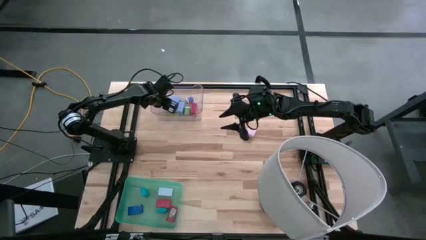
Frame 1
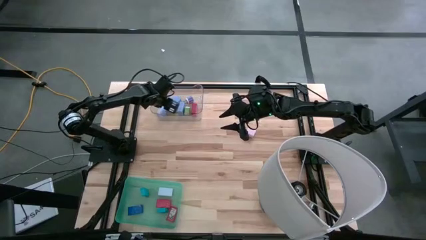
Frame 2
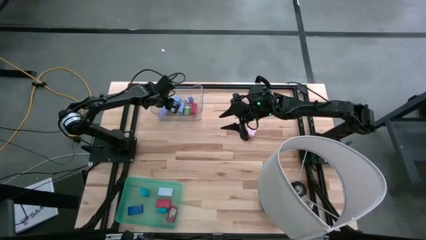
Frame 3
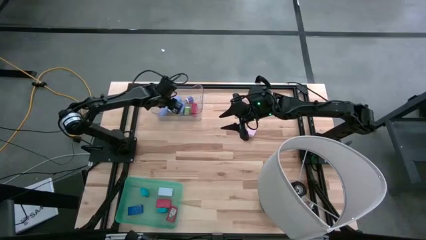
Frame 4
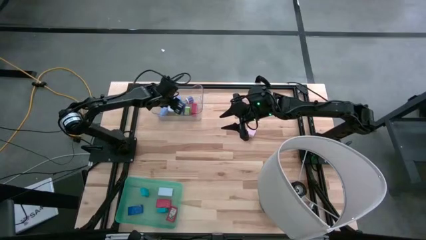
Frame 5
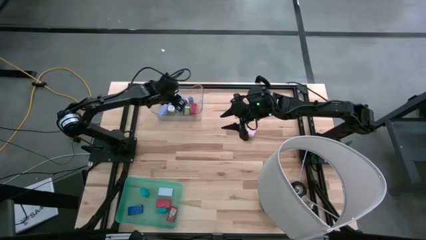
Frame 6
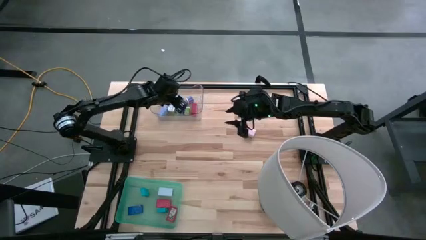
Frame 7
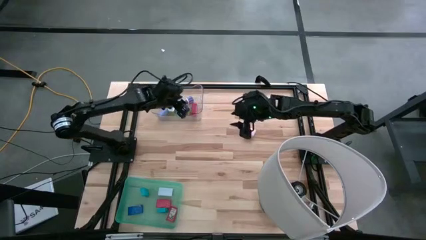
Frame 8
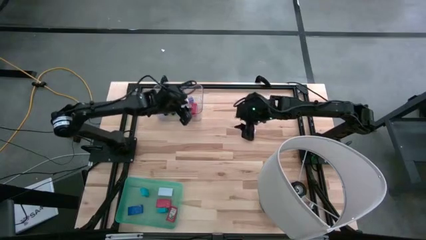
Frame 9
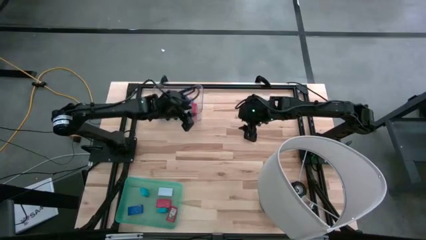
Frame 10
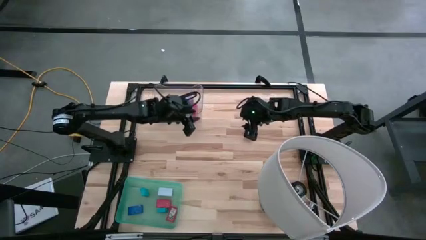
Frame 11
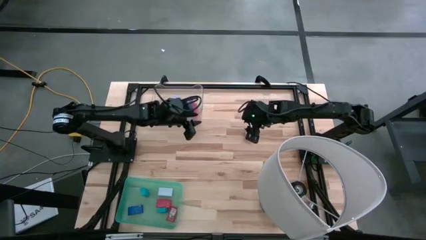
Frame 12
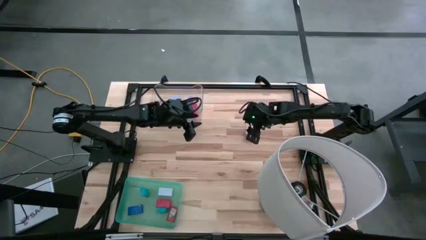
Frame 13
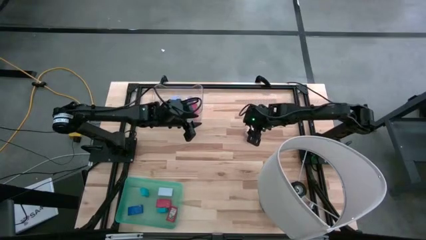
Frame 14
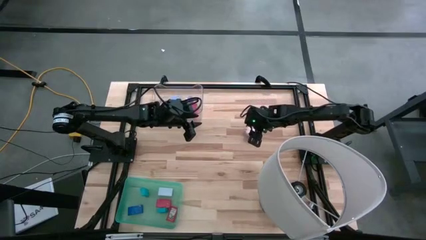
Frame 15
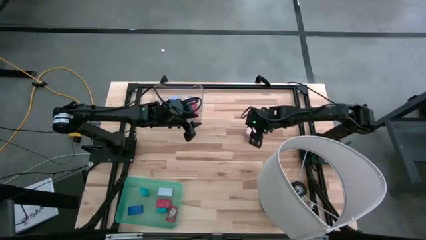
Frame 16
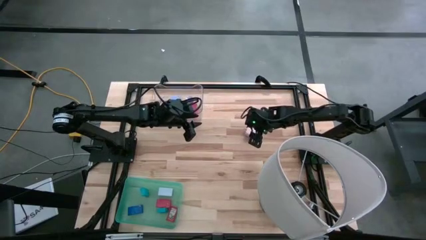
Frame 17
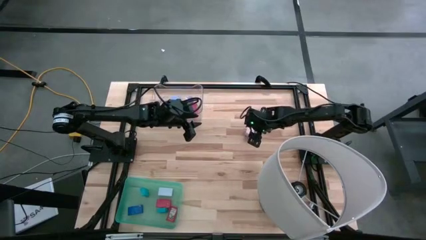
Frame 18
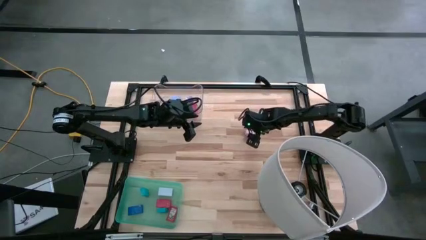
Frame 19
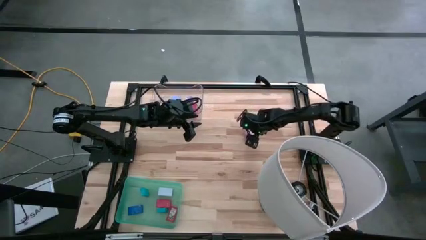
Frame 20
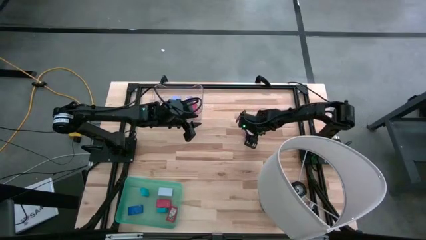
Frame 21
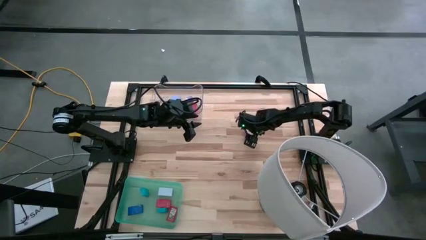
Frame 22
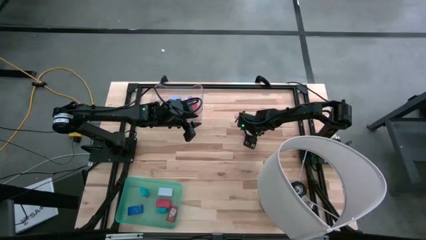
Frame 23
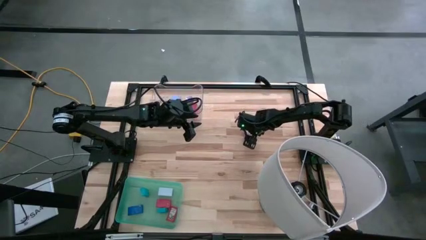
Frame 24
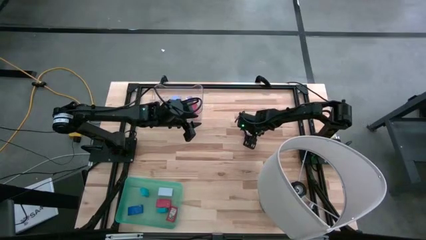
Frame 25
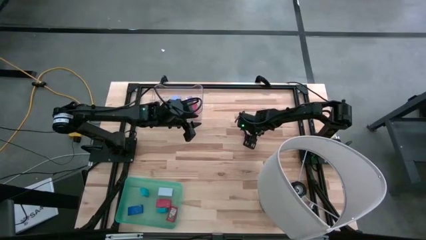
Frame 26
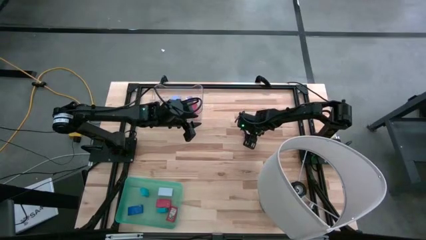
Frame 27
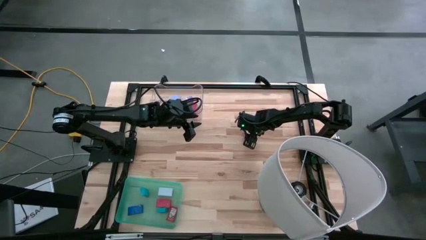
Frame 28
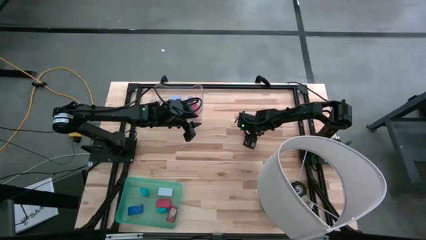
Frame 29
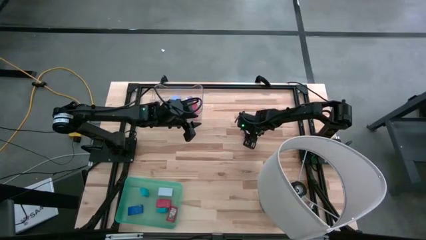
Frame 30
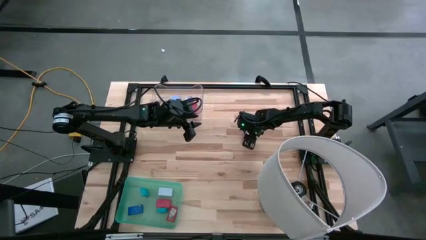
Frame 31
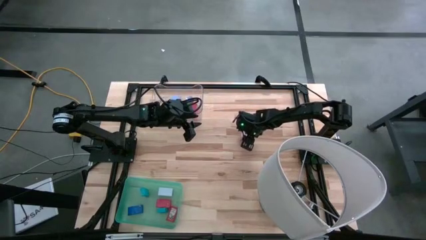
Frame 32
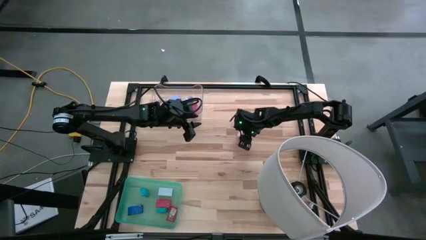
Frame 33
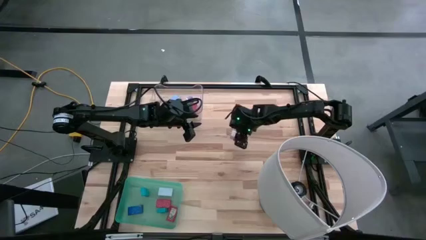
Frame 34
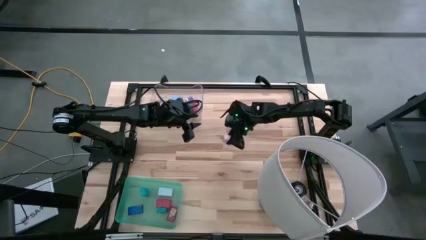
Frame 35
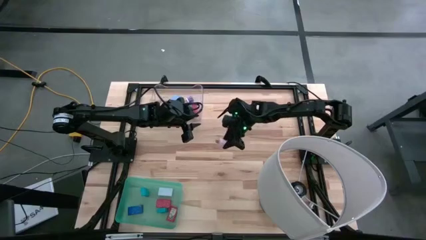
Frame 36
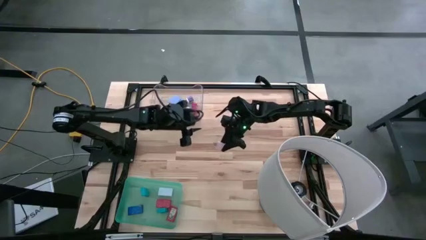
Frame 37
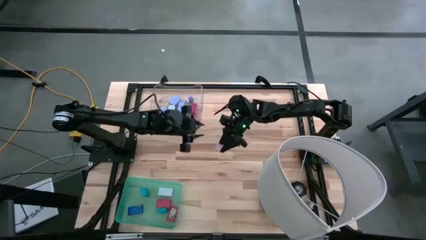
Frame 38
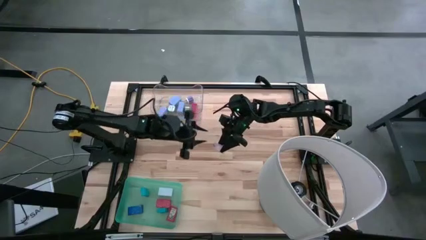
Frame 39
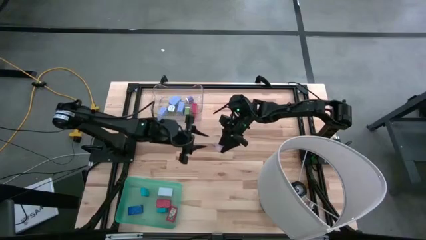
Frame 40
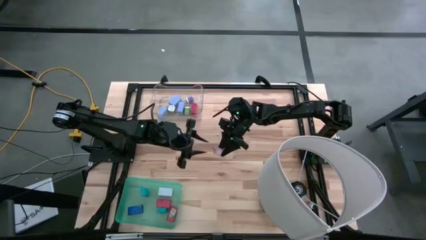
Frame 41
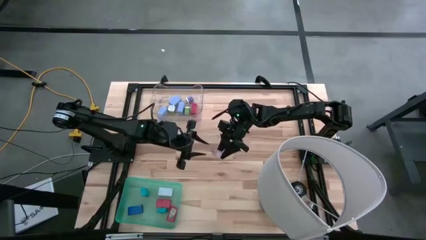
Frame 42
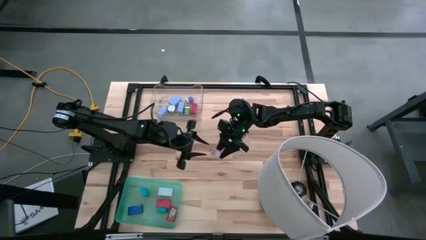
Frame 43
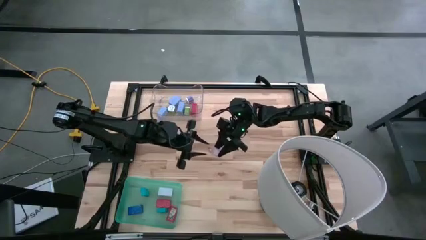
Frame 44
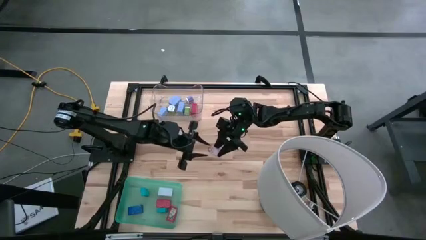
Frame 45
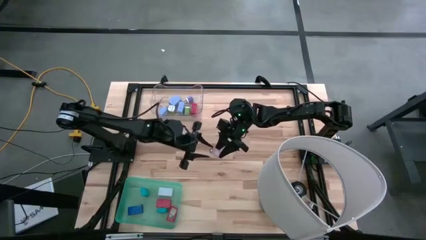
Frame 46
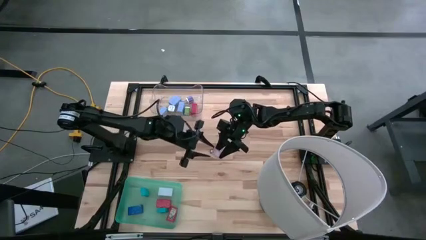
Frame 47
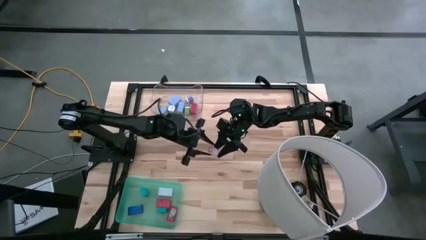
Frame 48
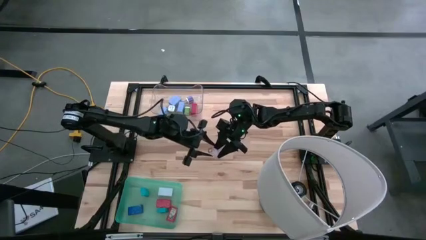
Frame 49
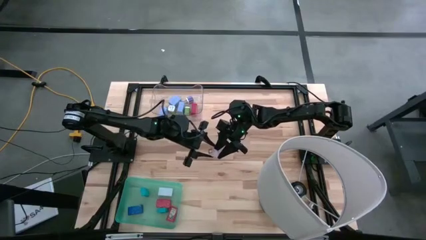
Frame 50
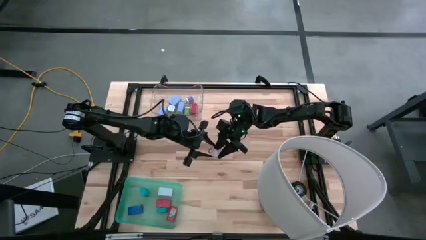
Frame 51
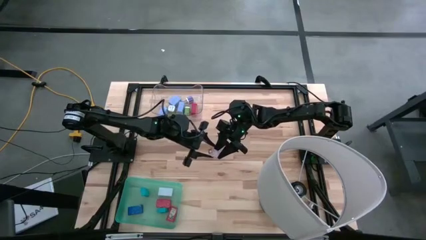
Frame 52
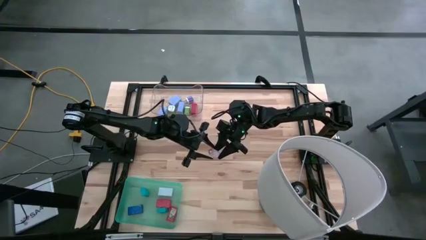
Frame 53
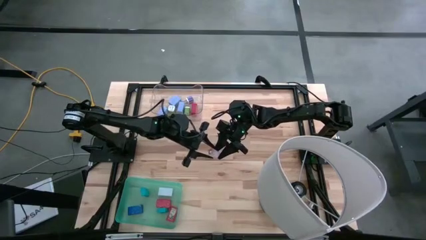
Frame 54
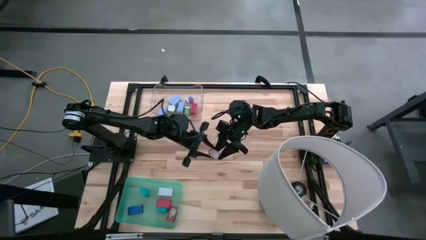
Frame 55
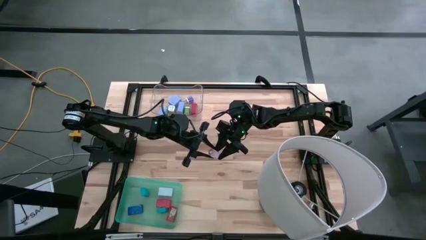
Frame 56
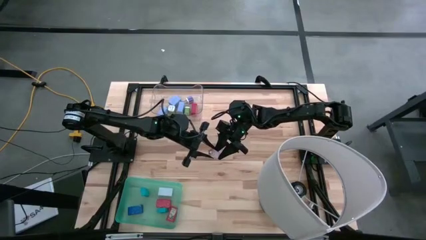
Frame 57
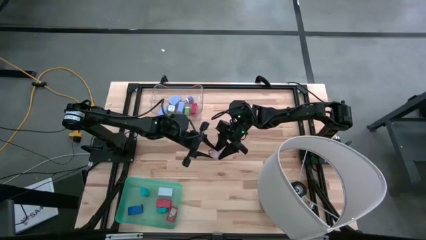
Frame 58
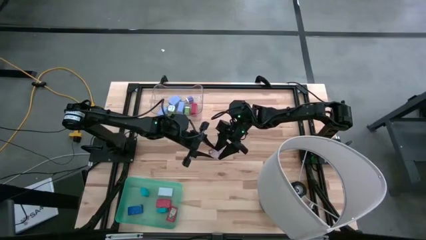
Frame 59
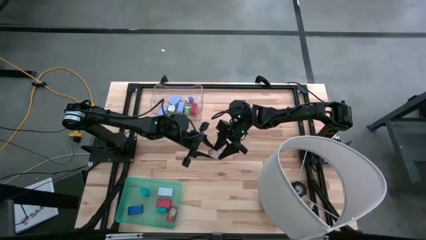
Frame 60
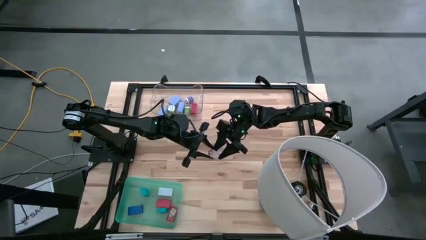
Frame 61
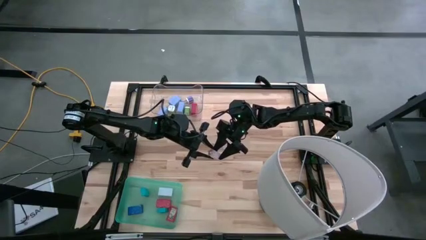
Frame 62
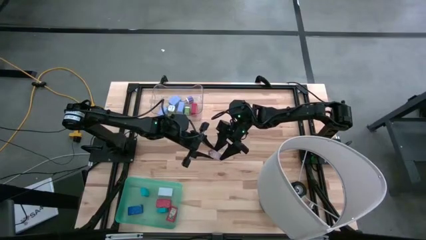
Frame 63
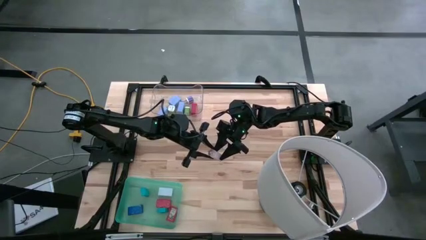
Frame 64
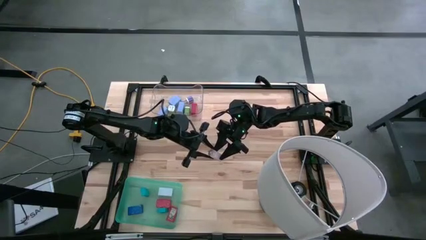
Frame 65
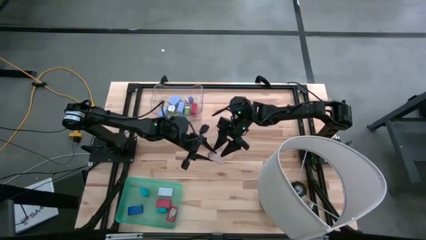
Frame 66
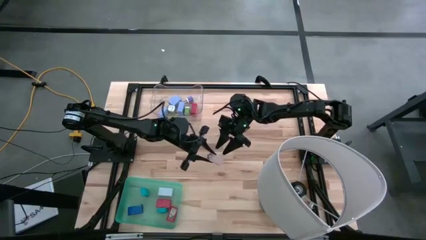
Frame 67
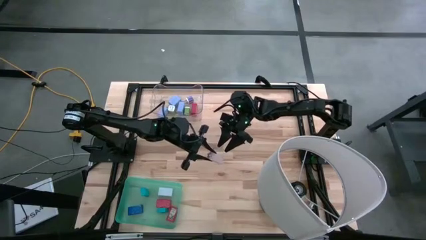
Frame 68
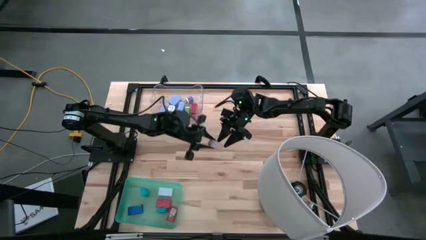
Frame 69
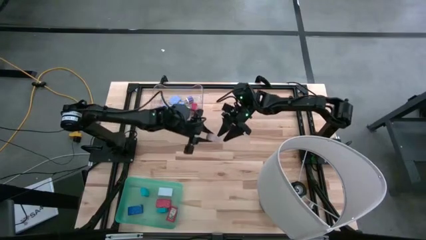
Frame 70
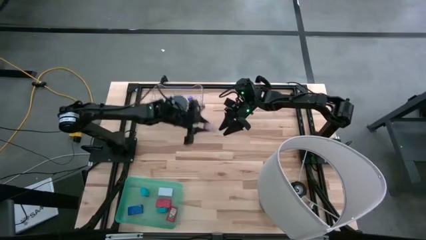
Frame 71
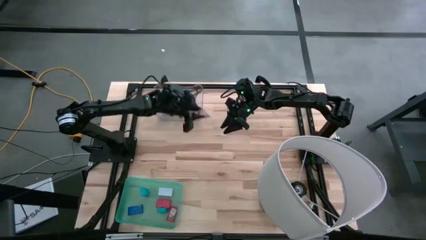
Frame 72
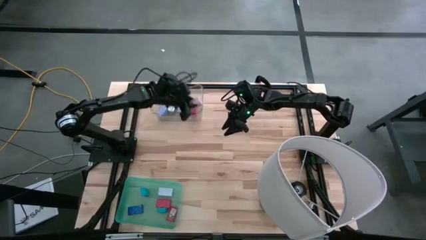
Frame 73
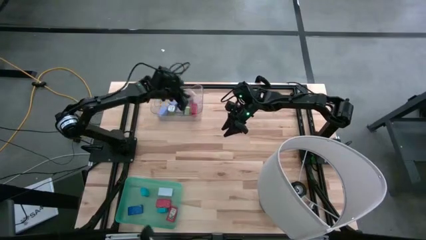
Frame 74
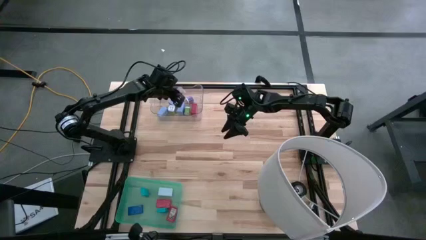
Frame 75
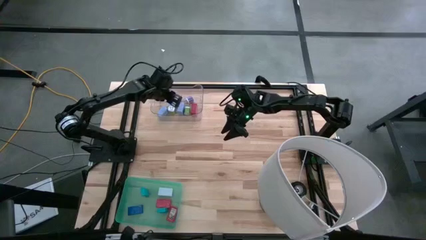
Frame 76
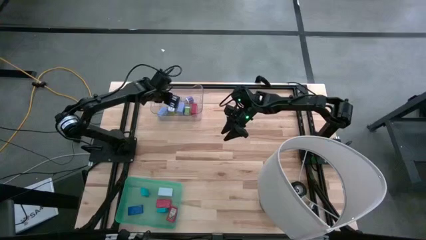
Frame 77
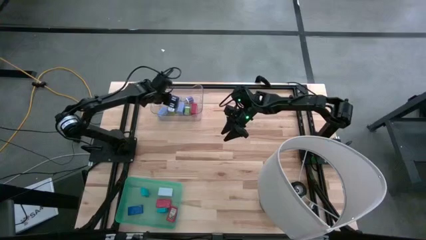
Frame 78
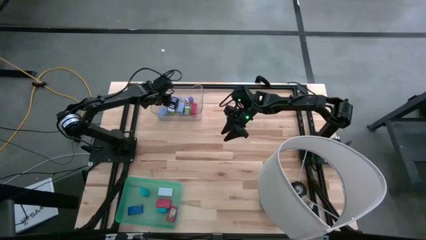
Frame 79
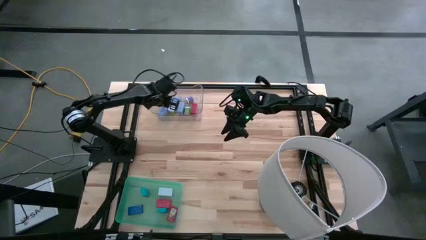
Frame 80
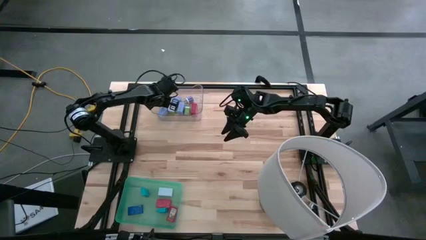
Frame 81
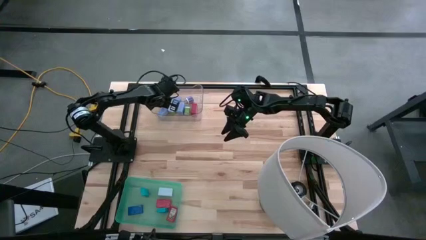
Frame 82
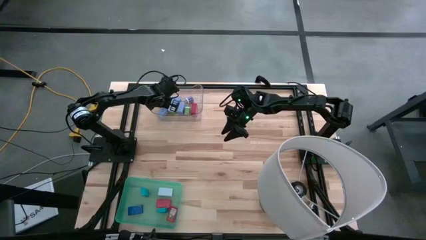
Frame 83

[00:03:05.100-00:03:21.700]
Task: Pick & Place Office items
Put the white charger adapter into the transparent bin
